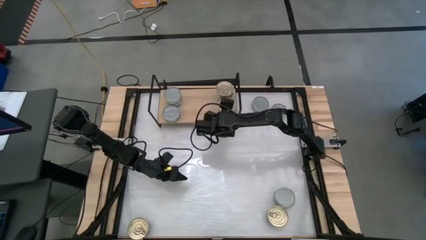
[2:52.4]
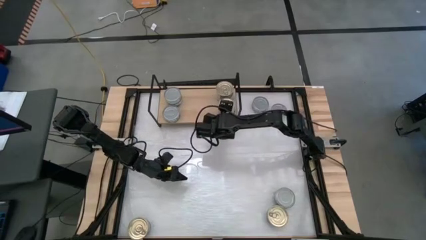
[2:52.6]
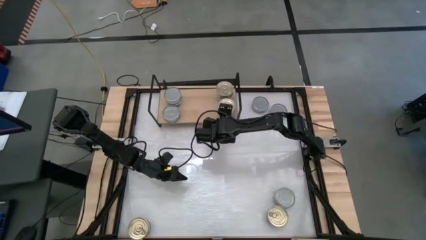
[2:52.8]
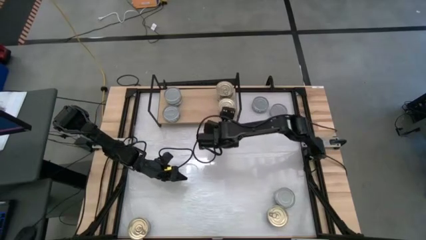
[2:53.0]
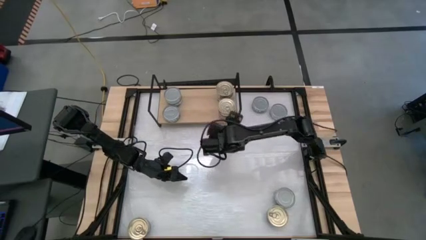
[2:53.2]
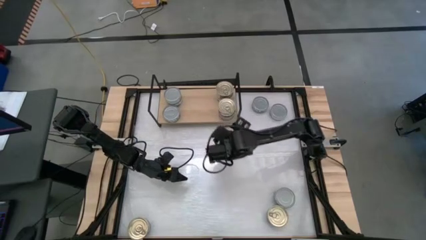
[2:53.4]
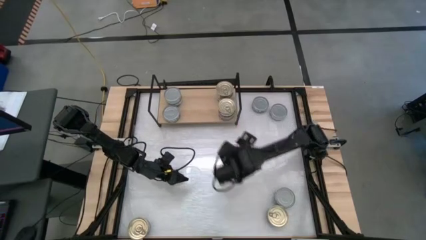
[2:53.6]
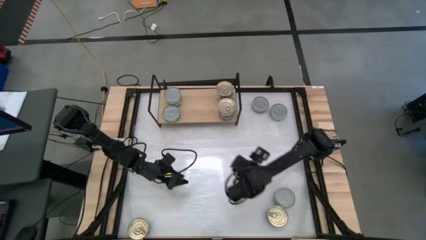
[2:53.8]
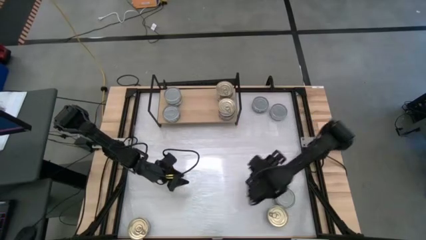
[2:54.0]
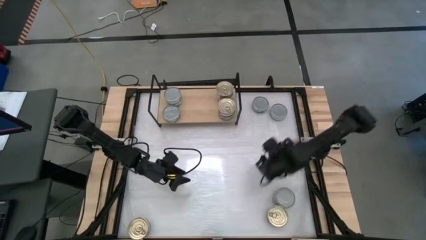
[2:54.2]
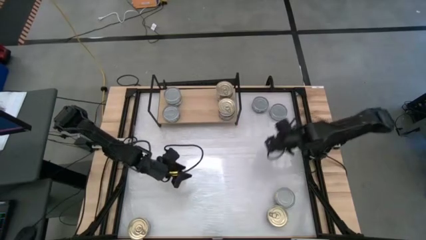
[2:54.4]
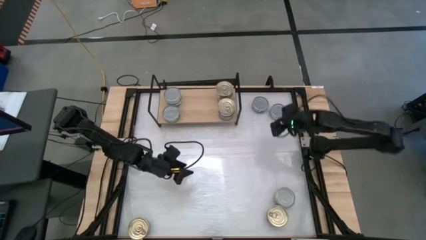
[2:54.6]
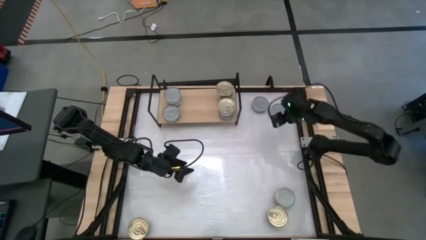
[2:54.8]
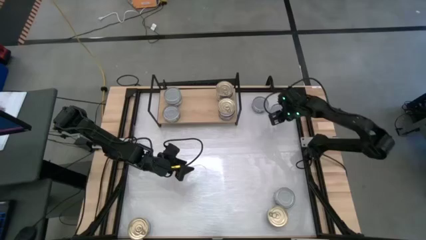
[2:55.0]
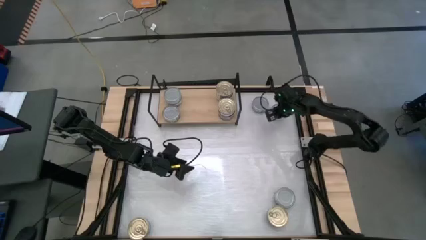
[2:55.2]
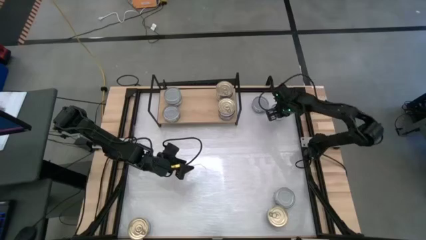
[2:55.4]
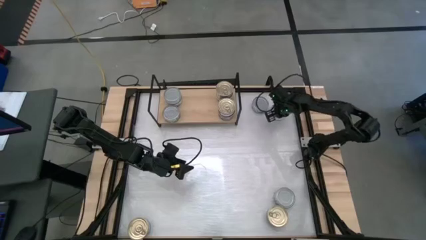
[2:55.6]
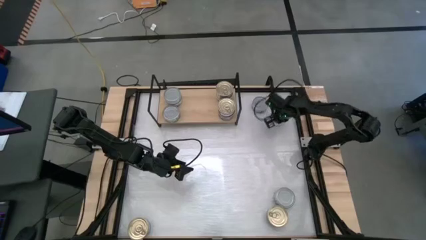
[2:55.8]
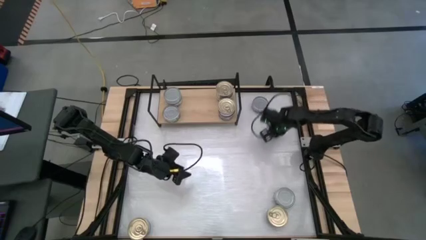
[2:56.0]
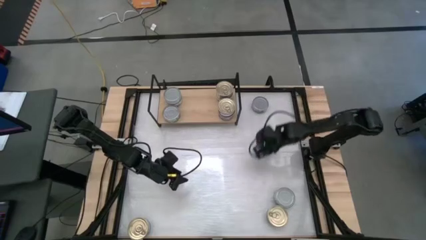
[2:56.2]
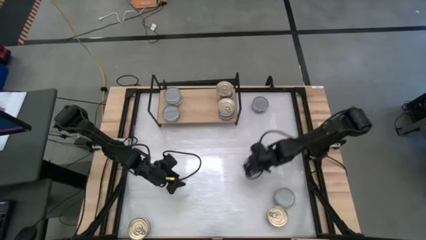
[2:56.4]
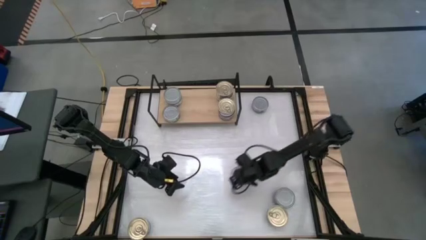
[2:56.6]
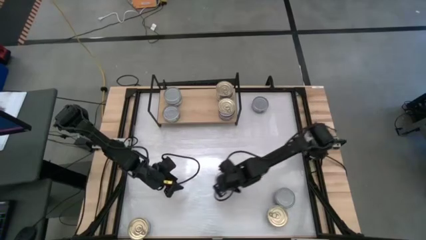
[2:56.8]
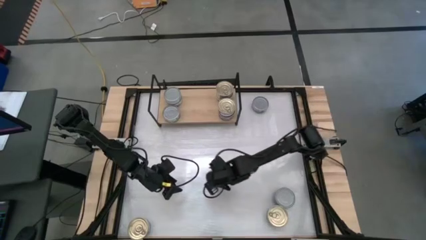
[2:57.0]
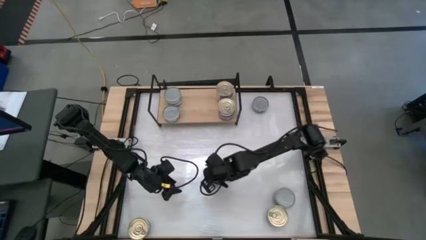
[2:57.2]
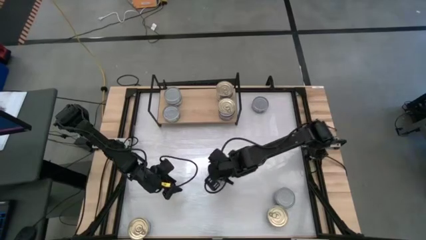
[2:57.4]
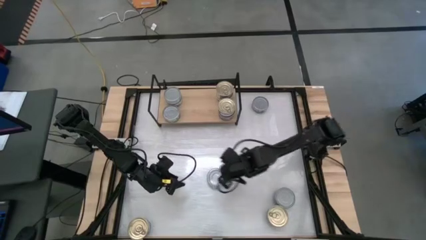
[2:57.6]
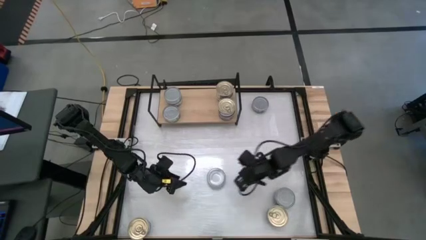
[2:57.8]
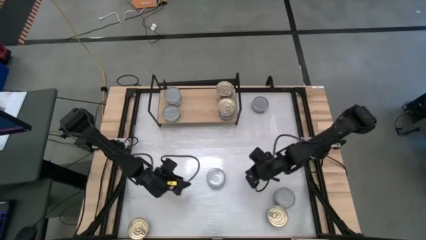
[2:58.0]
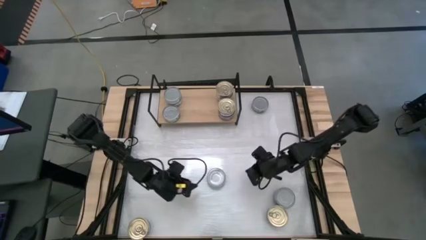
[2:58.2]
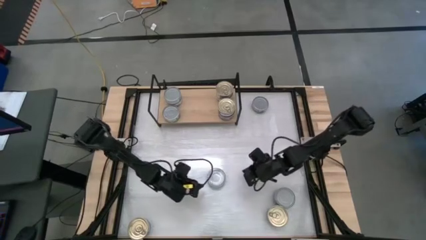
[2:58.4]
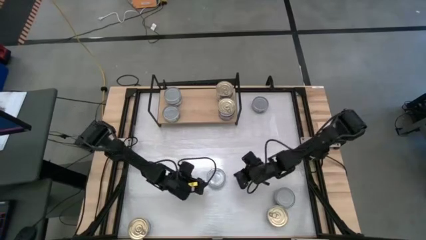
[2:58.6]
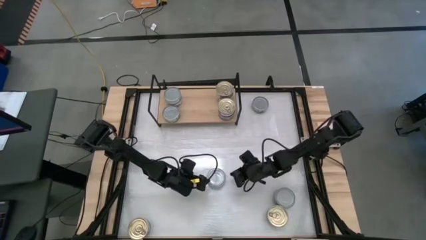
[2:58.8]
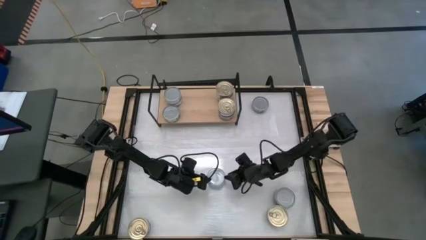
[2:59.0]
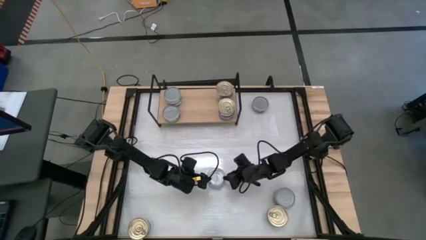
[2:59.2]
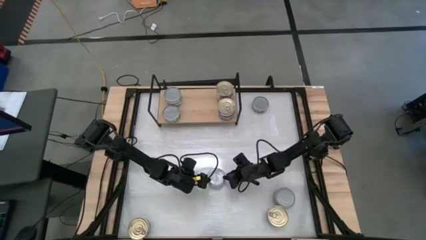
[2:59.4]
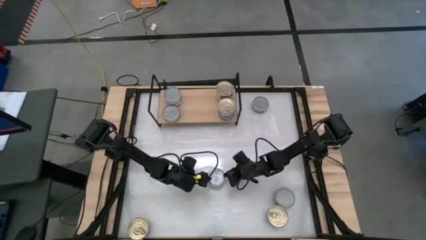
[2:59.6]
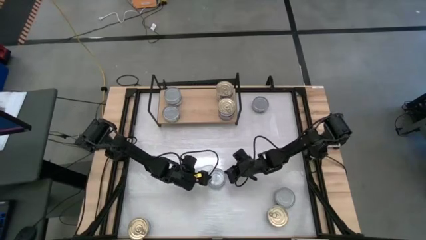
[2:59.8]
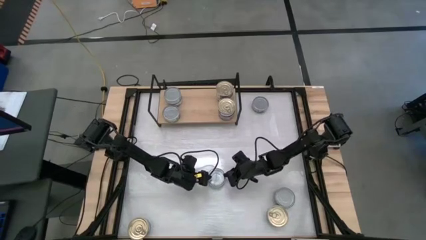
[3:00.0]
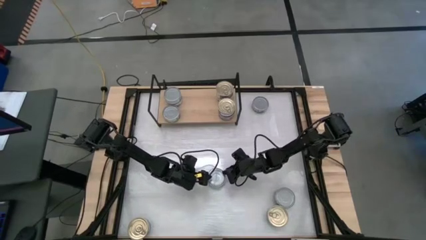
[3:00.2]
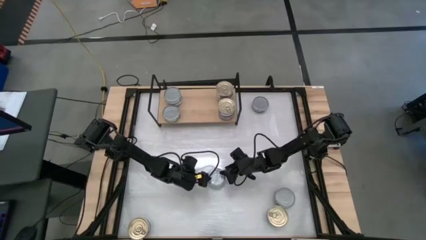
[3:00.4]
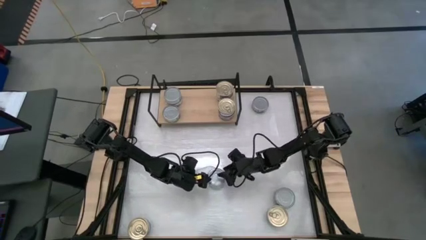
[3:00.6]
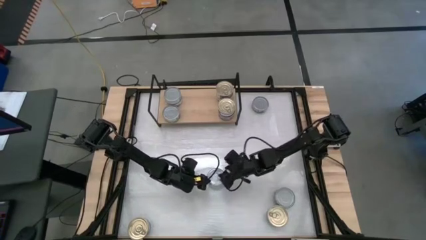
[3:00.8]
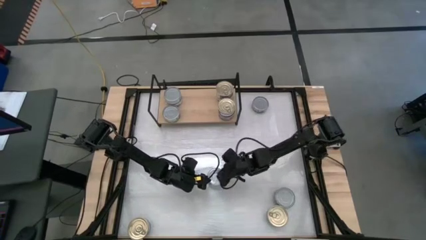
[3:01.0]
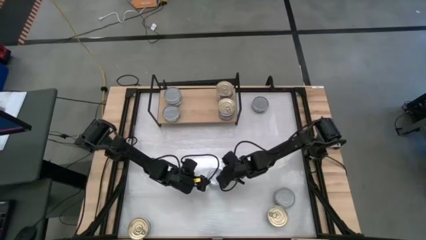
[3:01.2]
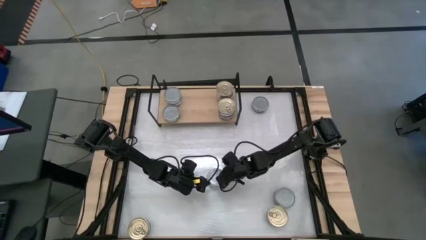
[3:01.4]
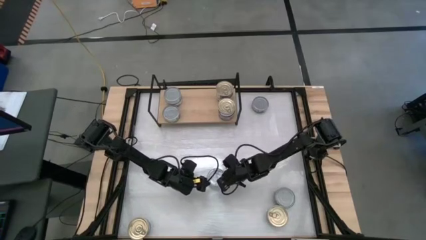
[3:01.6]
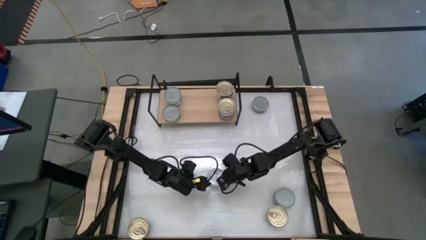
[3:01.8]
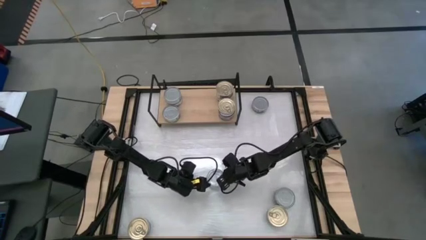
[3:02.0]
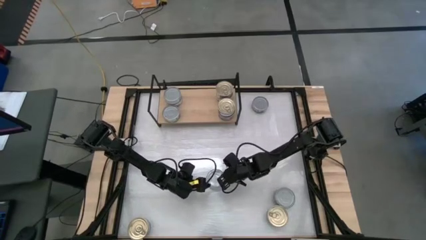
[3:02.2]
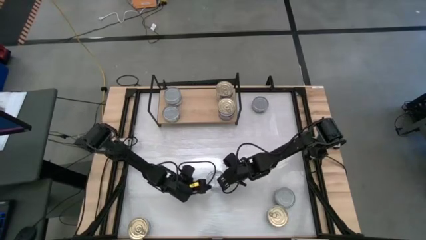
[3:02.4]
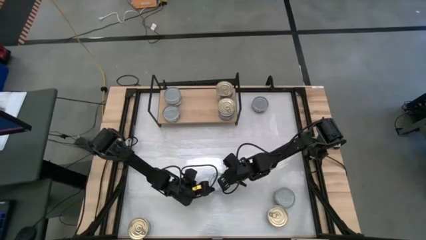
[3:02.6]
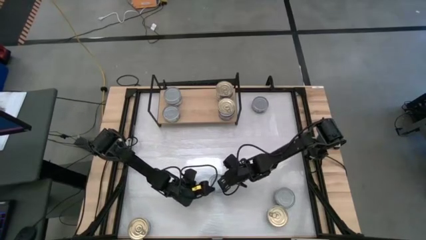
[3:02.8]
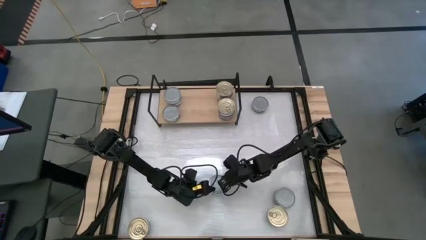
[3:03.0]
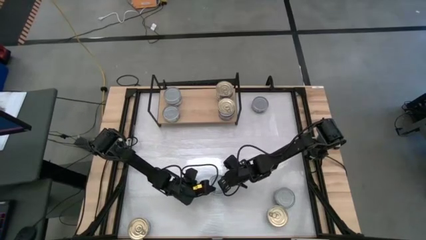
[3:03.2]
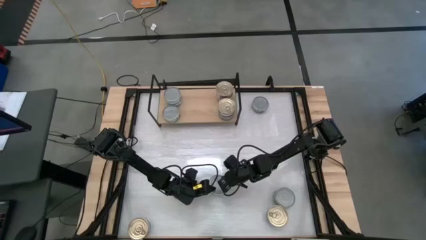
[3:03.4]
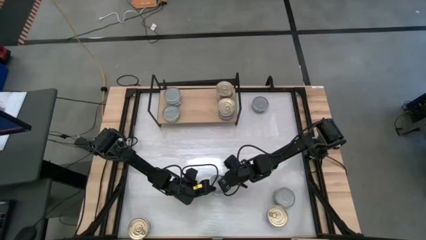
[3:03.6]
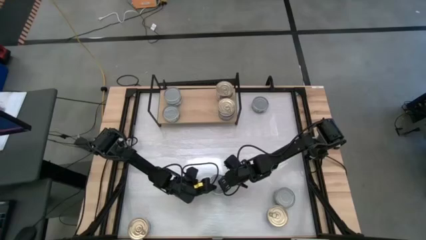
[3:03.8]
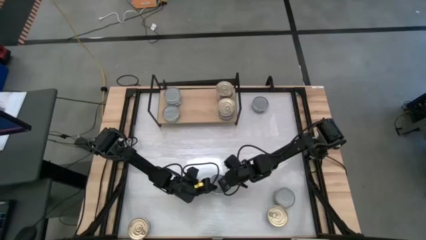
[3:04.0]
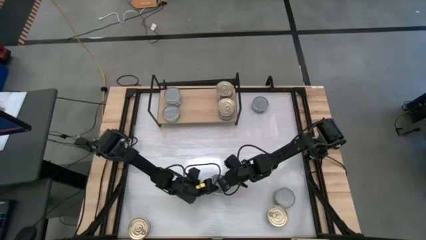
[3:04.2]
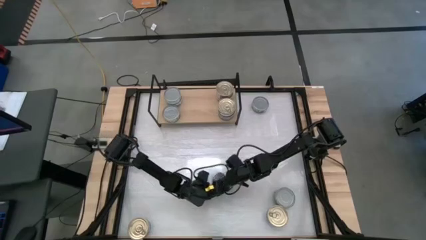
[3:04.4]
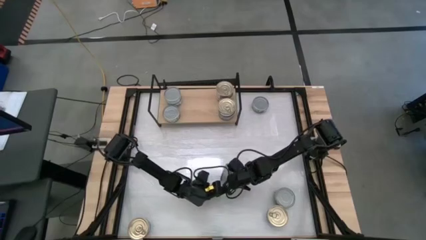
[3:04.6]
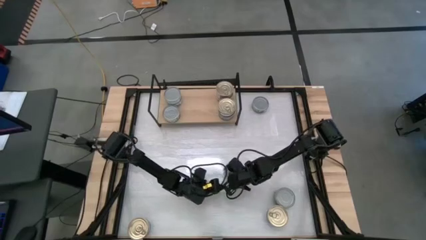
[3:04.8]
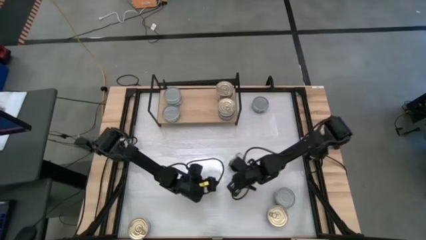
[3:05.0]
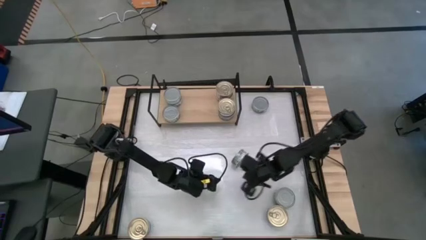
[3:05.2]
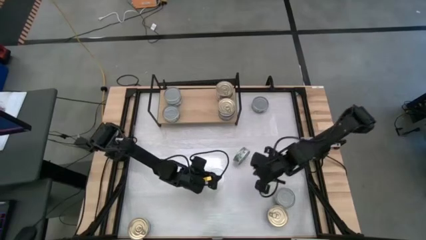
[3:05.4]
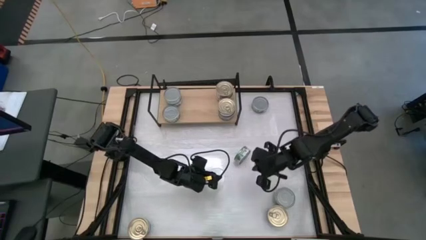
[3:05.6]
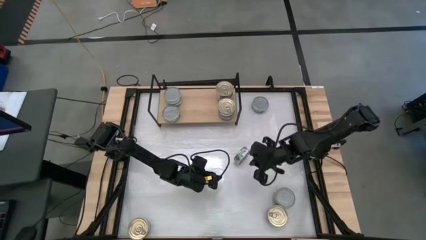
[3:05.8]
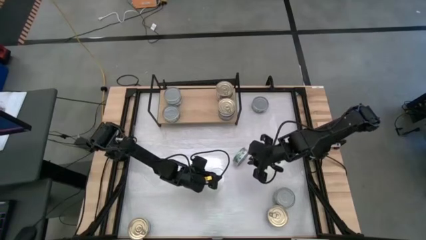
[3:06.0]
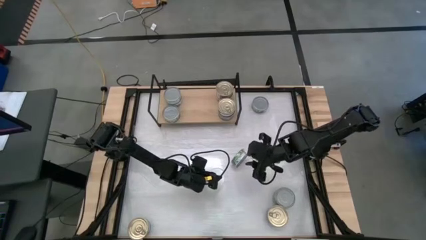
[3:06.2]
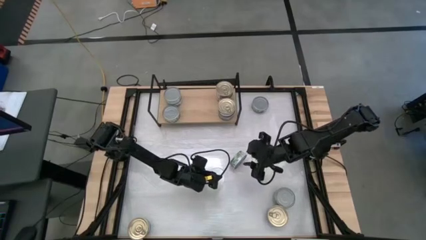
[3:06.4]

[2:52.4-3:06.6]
Task: Stack canned seafood by type on shelf
Stack the green tuna can on top of the green tuna can on the shelf

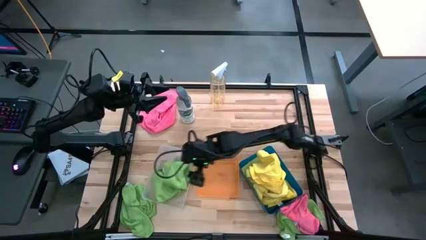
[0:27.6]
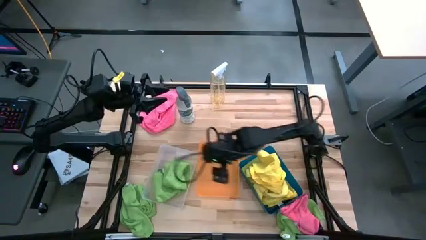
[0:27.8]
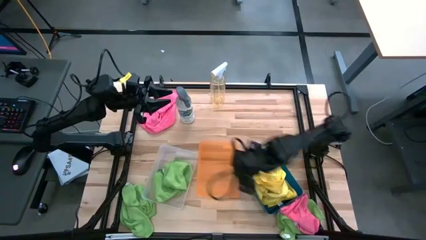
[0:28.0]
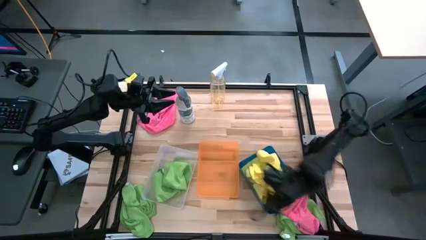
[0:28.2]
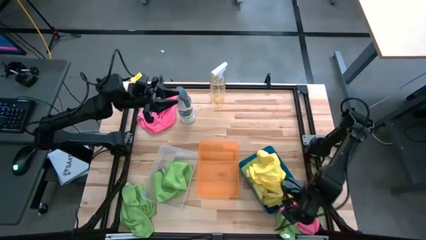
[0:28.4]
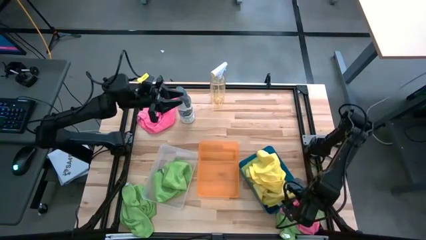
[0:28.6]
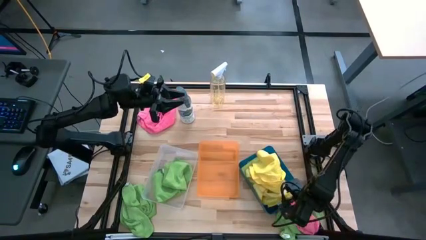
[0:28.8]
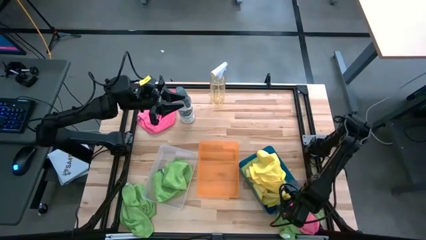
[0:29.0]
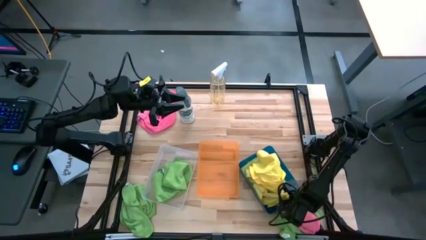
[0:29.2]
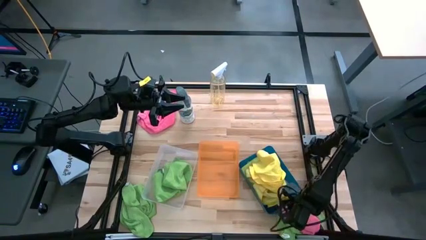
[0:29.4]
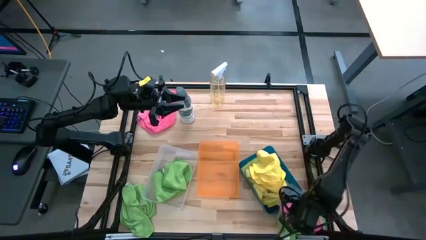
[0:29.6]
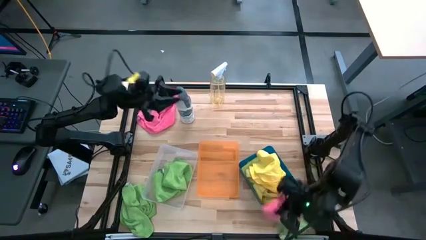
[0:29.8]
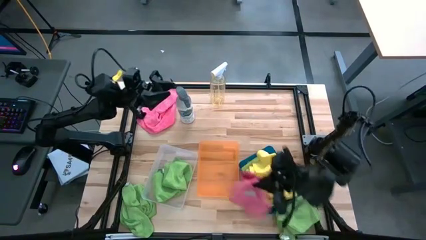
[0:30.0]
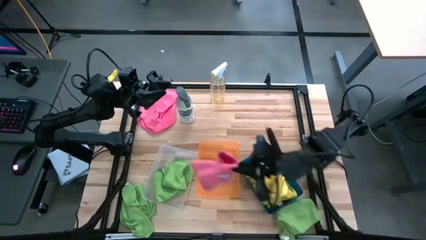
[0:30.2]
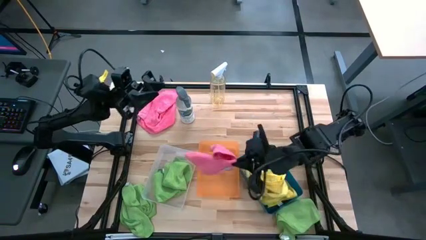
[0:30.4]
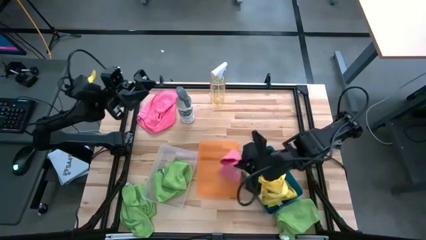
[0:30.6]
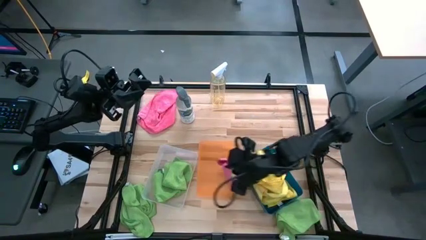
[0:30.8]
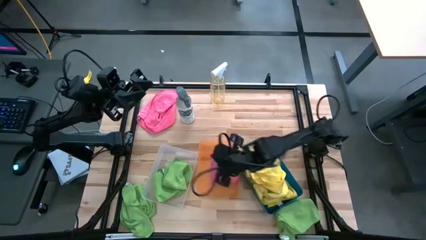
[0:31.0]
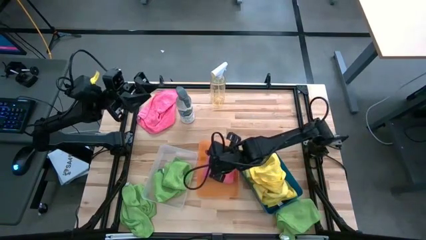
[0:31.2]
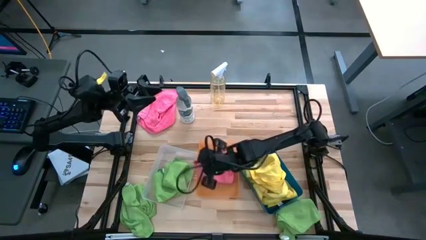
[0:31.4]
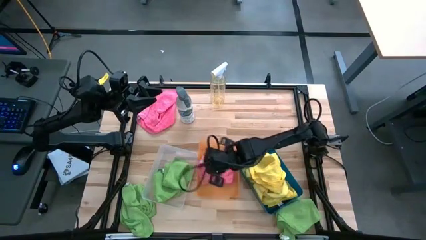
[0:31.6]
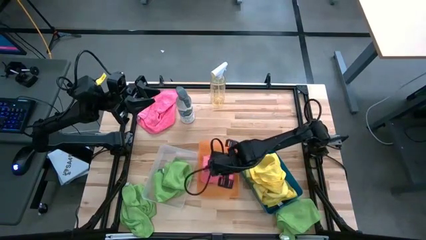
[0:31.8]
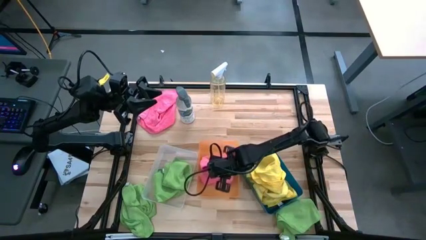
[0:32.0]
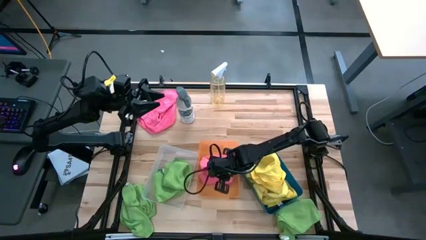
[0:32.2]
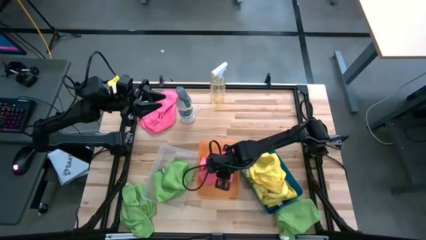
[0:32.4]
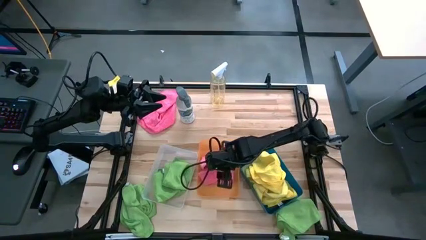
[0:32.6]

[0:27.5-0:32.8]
Task: Sort microfiber towel by color & place in baskets
Put the bottom pink microfiber cloth into the orange bin
